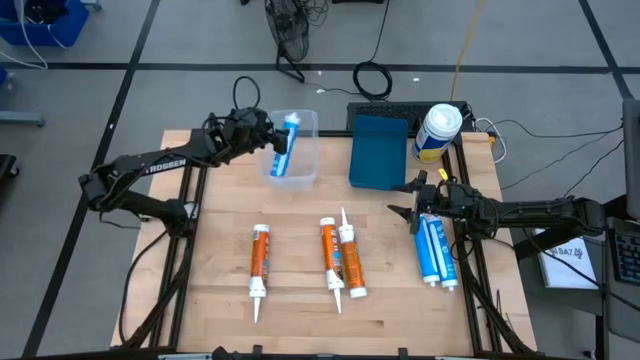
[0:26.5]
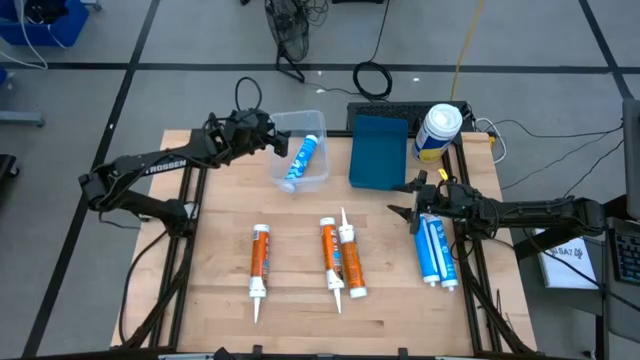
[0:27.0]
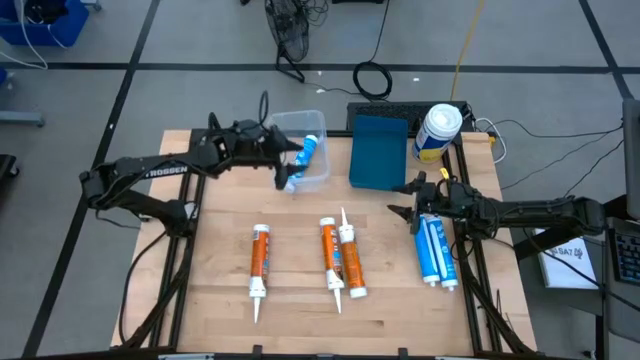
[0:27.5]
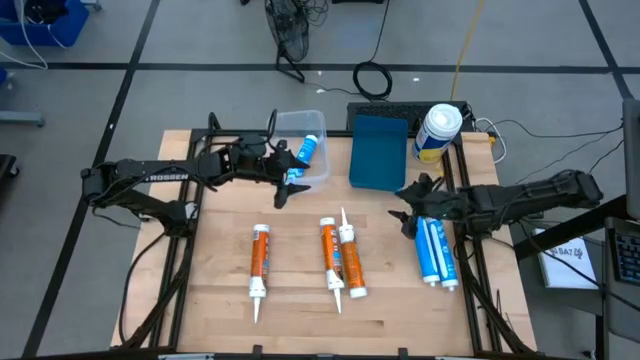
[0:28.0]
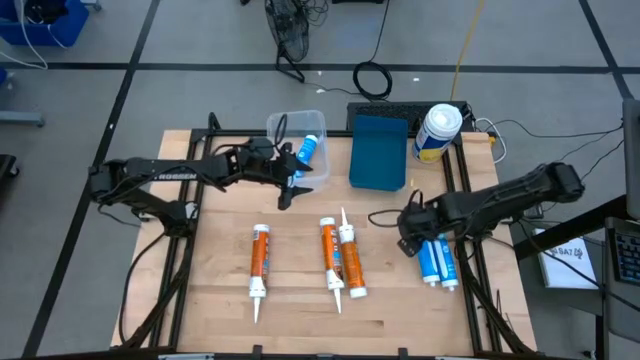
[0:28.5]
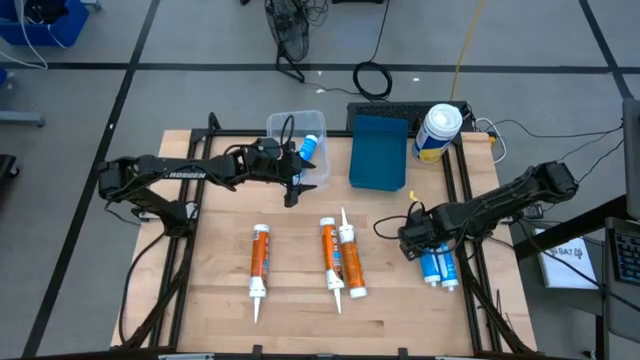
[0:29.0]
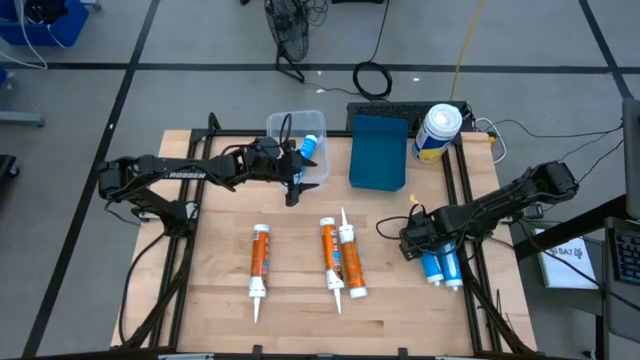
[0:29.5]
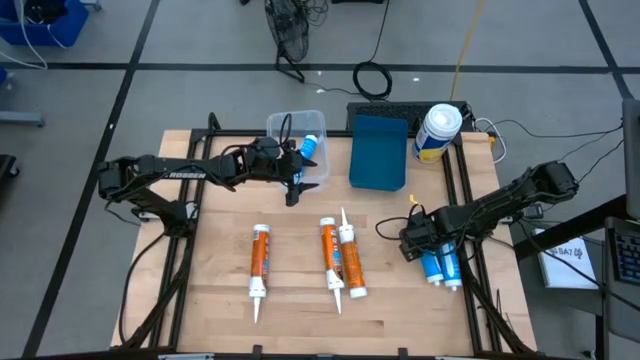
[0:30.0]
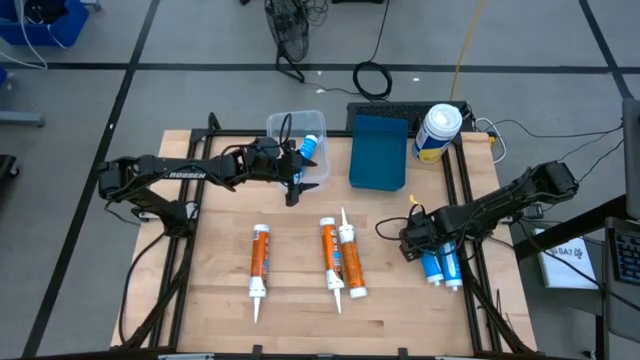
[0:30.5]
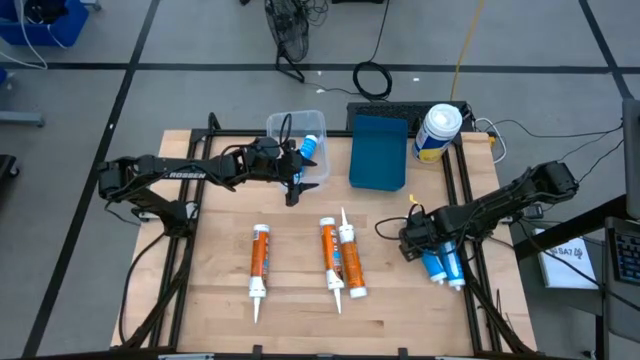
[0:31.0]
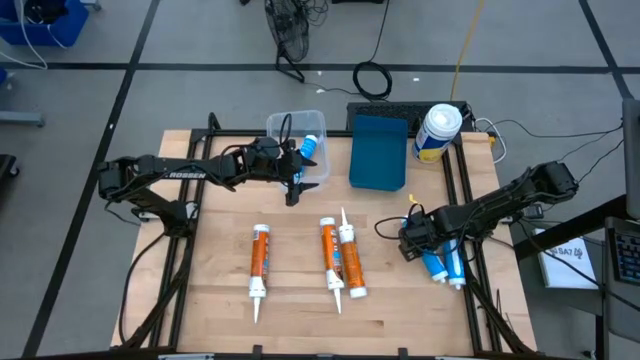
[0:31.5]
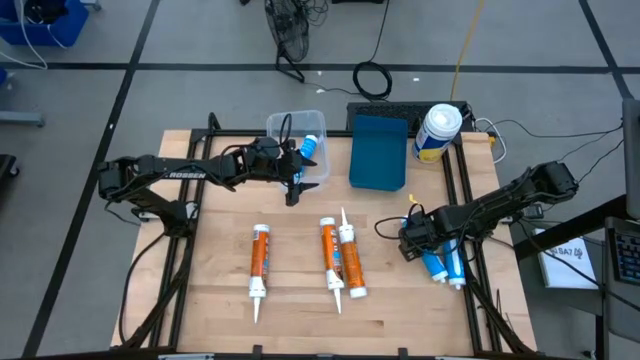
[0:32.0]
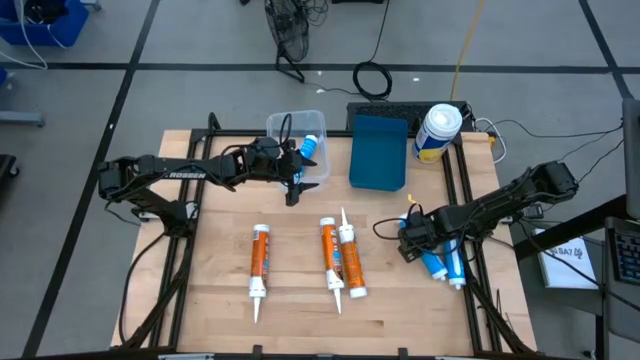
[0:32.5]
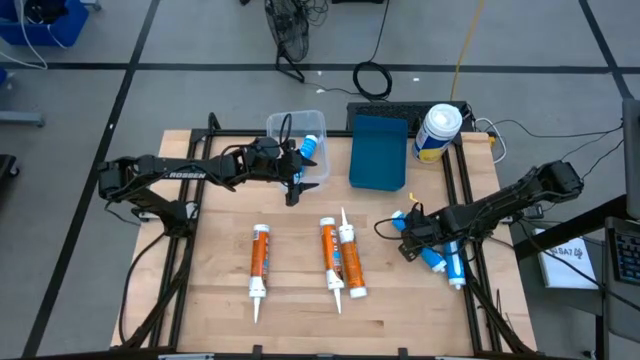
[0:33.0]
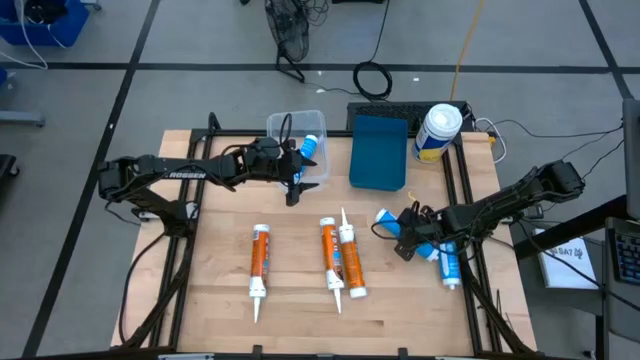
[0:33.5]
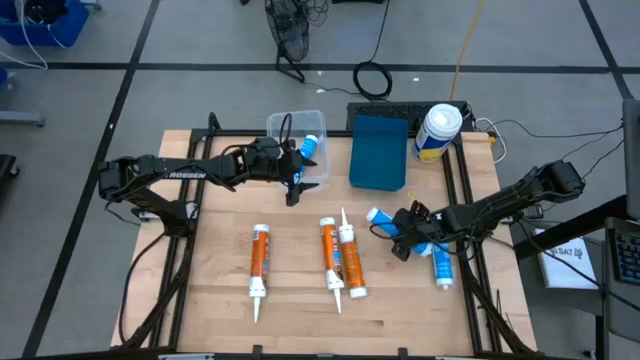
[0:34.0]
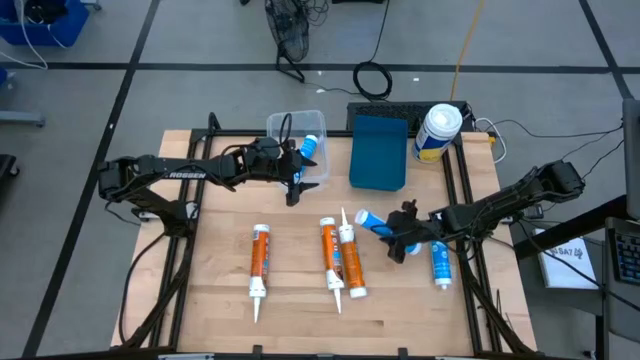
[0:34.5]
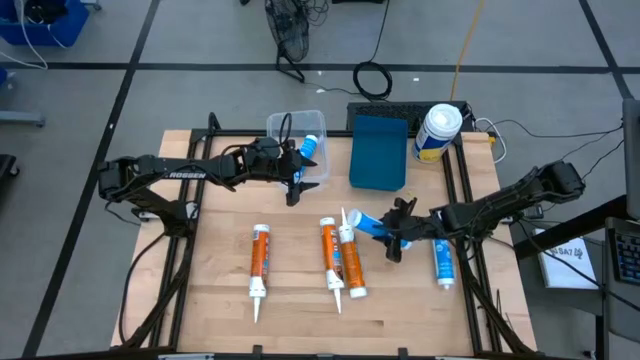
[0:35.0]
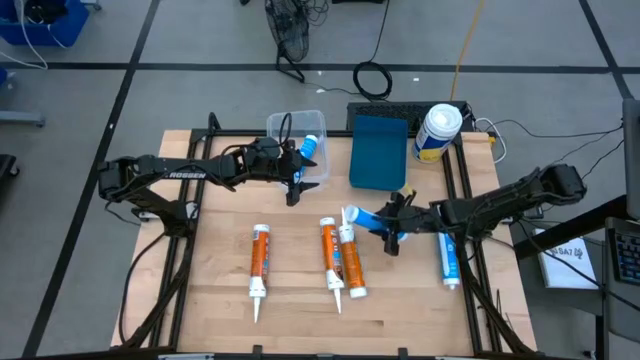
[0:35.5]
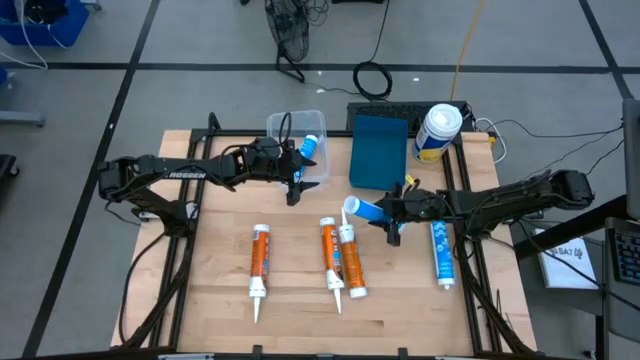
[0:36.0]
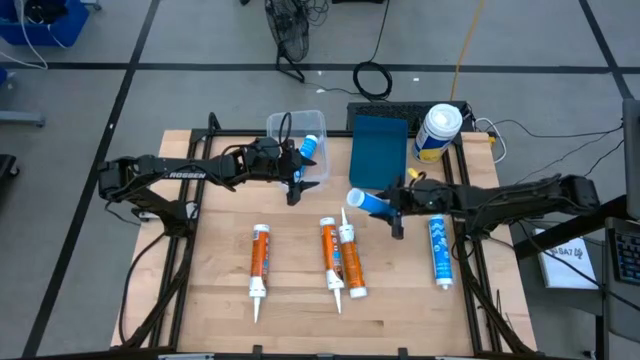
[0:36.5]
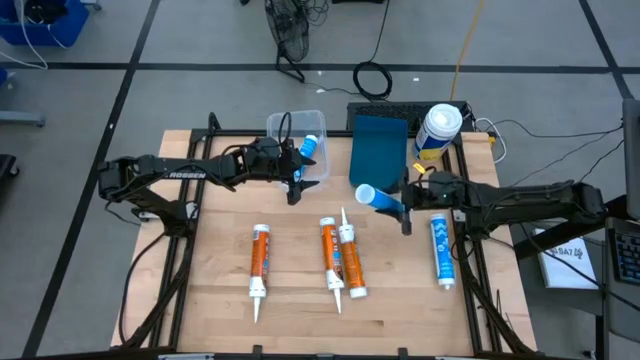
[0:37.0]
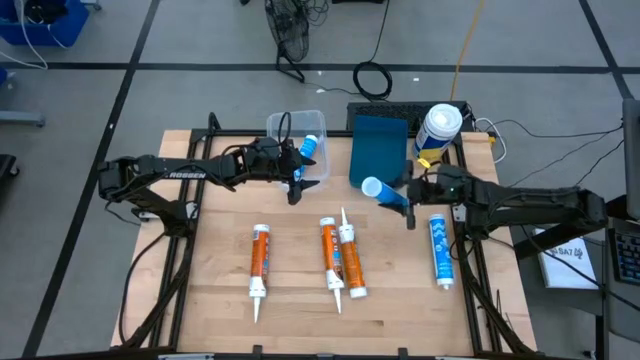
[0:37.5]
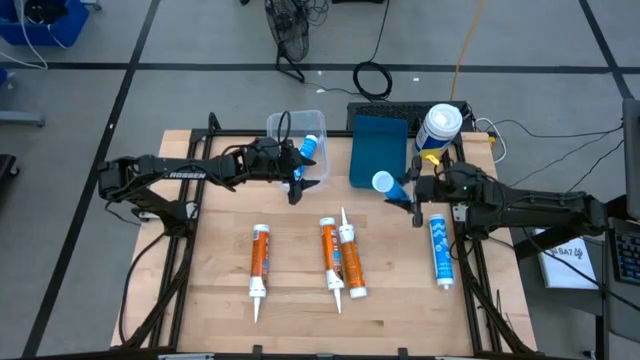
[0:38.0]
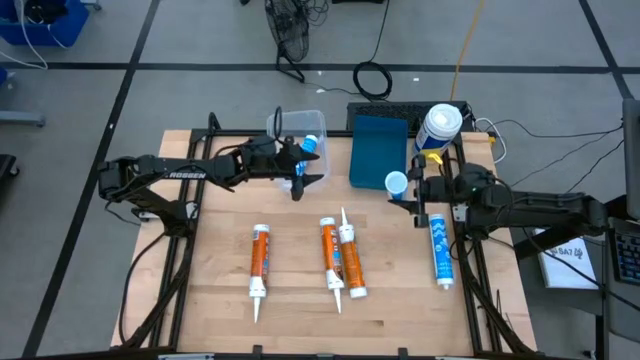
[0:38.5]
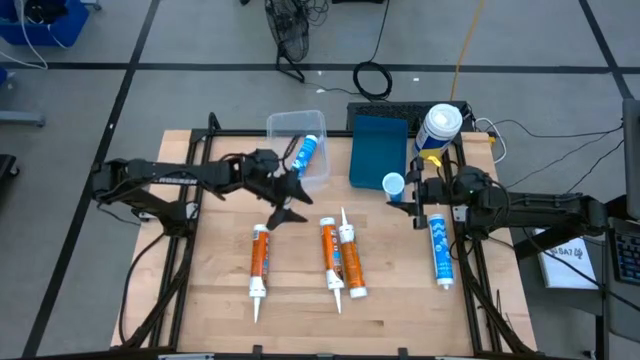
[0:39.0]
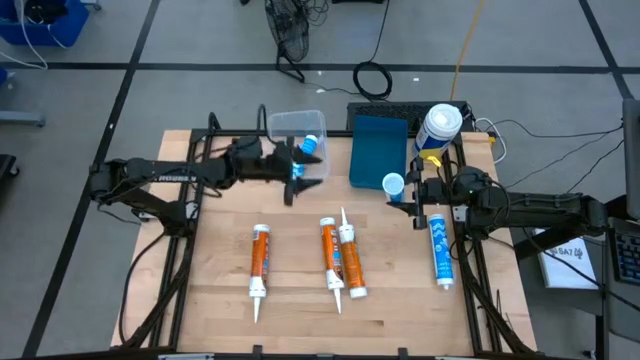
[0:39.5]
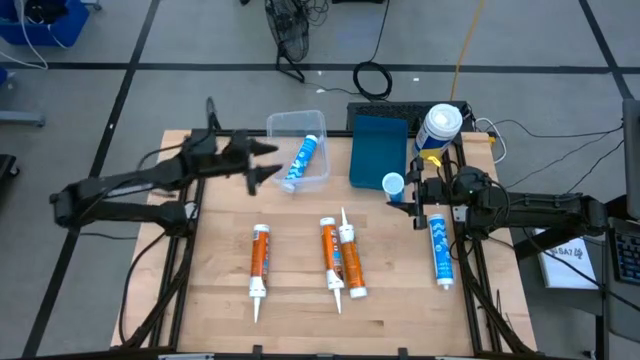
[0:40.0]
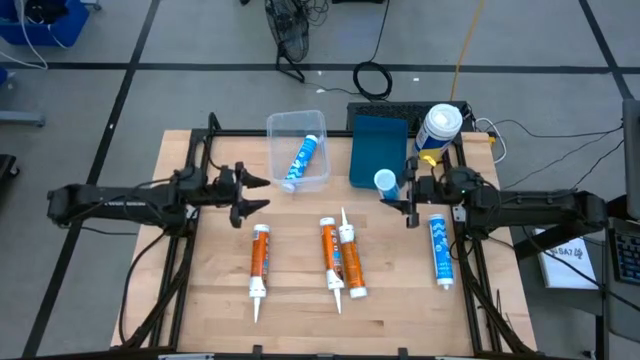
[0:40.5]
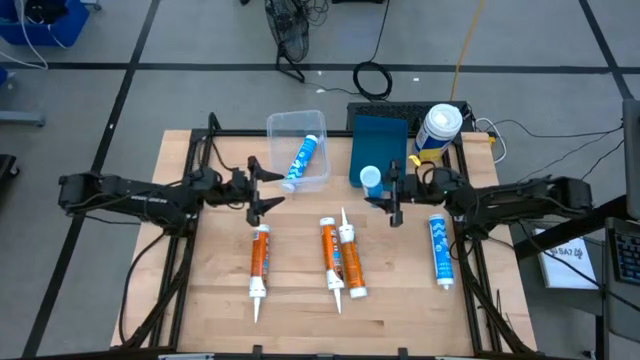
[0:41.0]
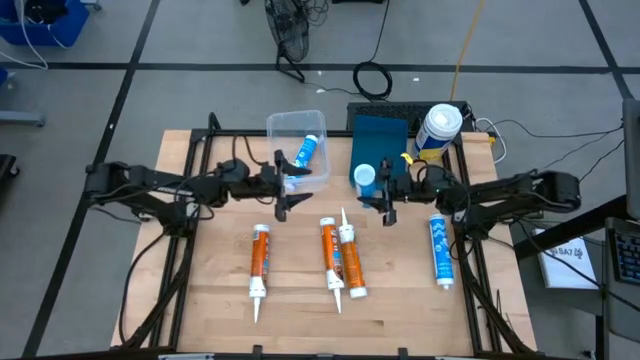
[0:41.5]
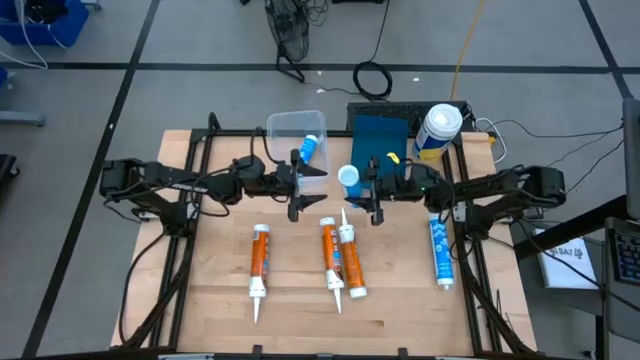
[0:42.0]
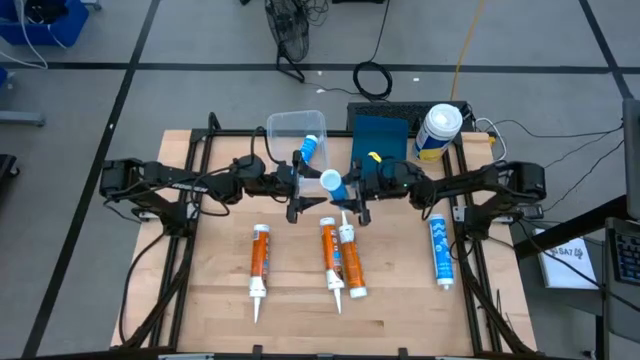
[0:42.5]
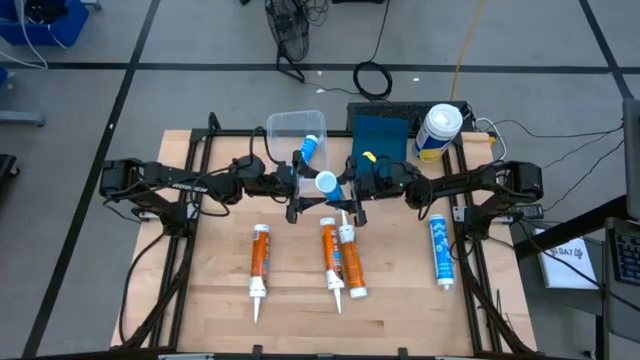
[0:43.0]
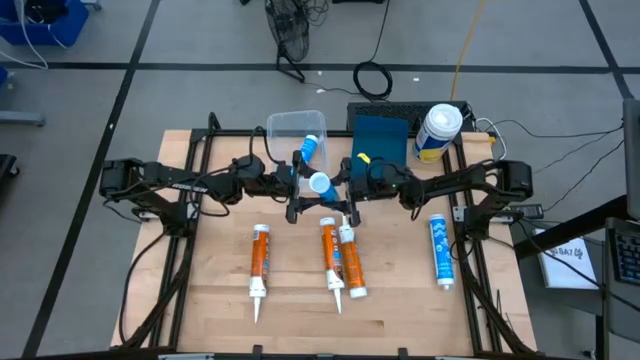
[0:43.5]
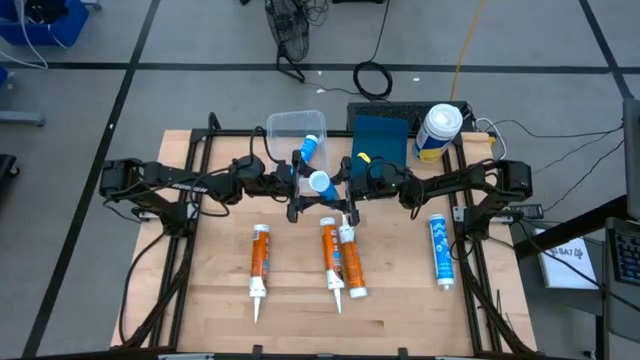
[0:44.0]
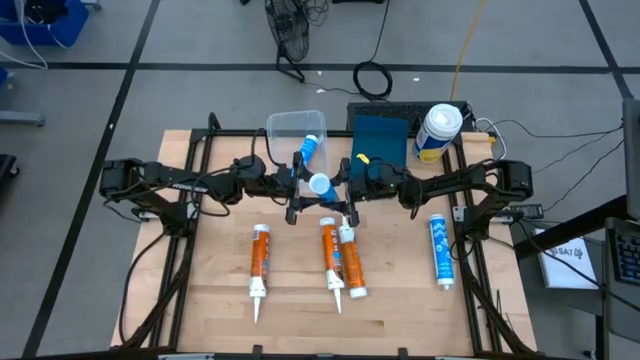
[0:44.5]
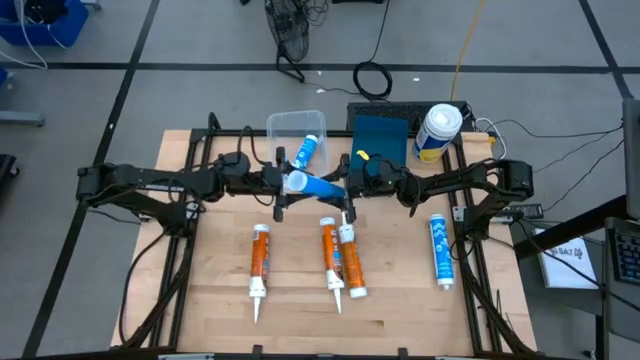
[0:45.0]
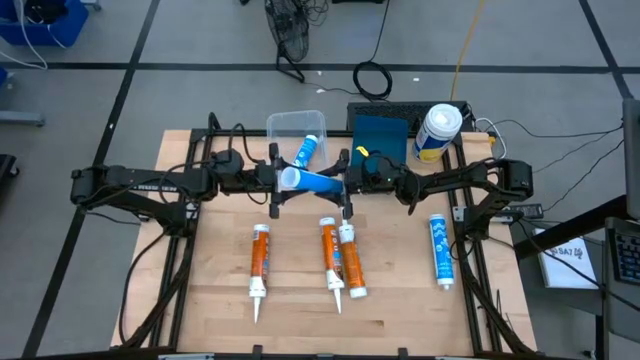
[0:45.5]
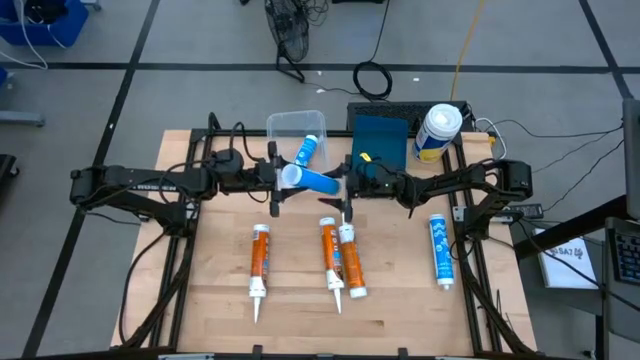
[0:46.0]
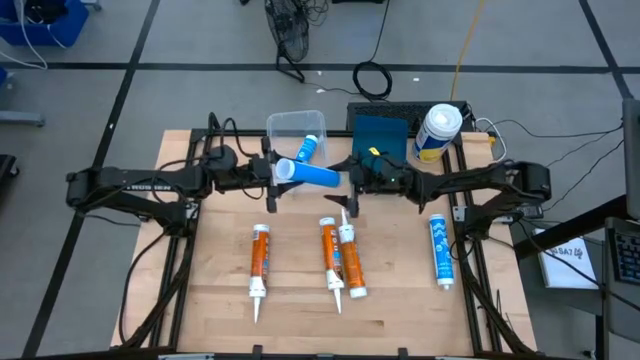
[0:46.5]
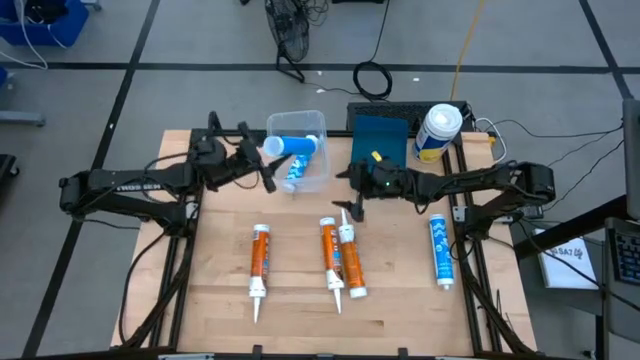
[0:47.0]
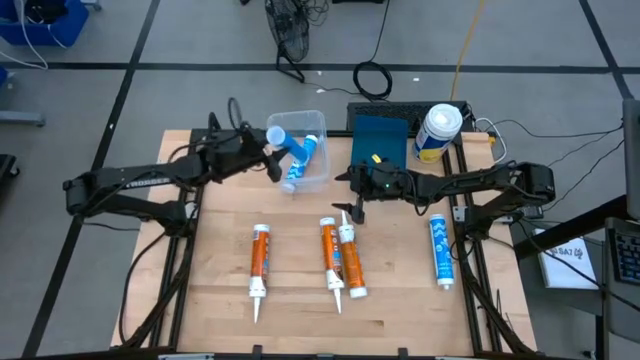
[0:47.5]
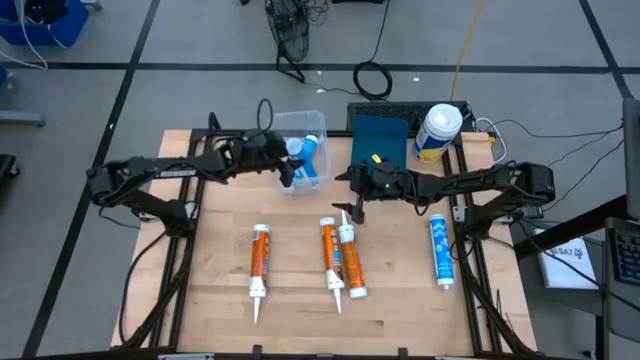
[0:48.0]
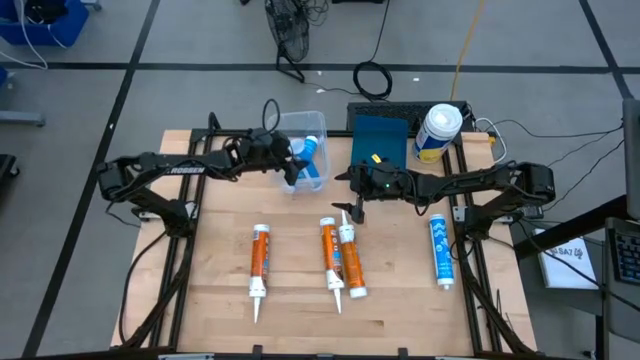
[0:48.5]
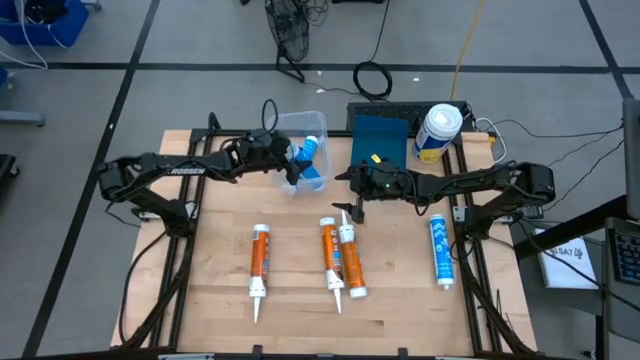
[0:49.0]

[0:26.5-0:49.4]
Task: Pick & place silicon tubes, Sealant and Lysol wipes
Put the left blue sealant into the transparent bin
